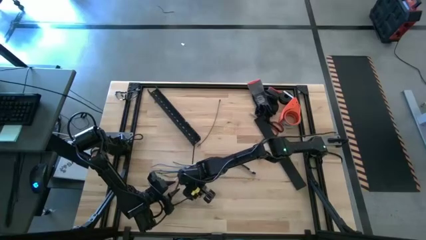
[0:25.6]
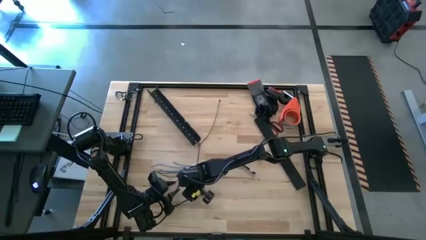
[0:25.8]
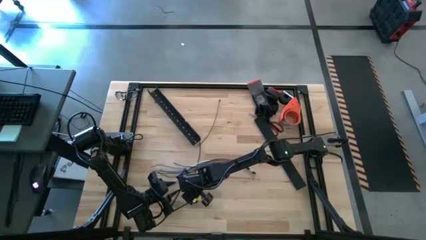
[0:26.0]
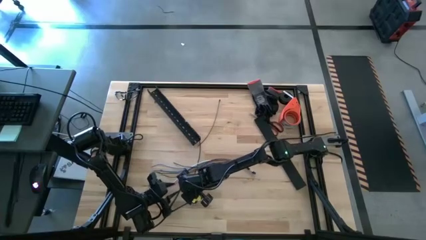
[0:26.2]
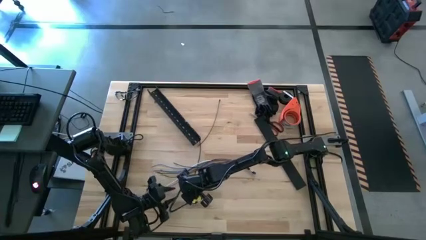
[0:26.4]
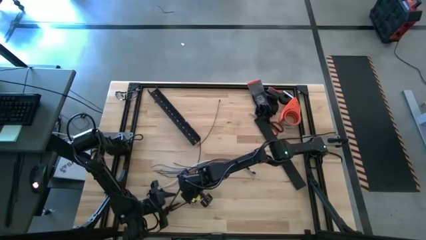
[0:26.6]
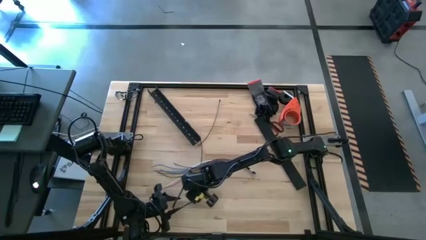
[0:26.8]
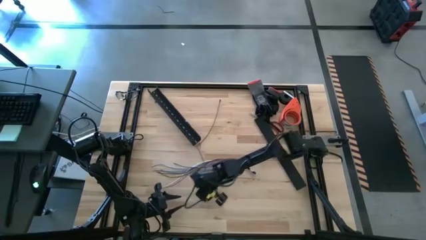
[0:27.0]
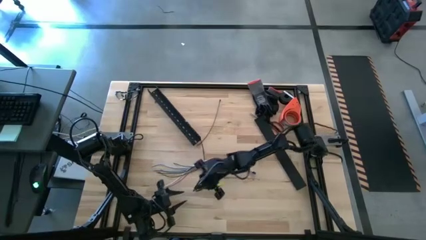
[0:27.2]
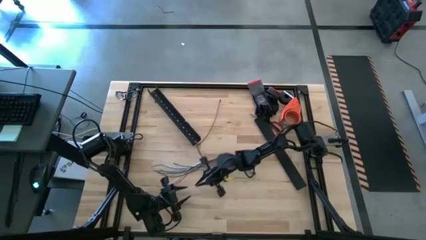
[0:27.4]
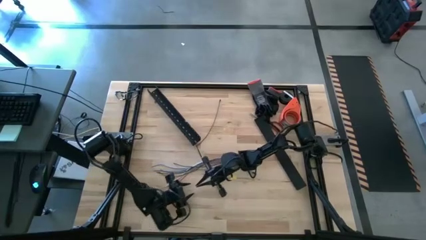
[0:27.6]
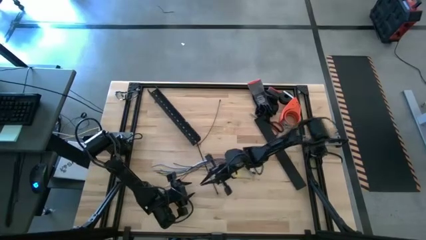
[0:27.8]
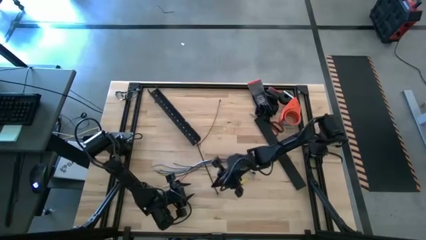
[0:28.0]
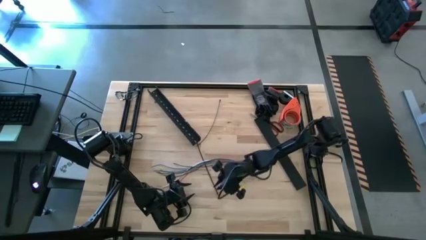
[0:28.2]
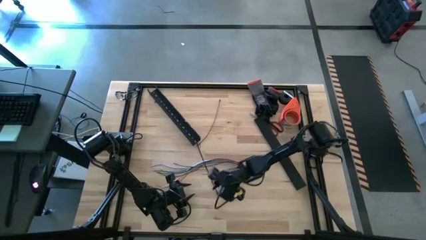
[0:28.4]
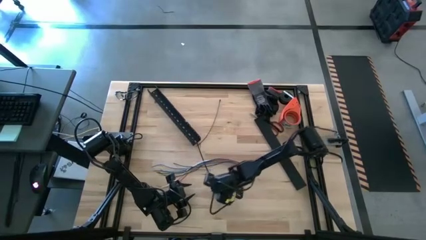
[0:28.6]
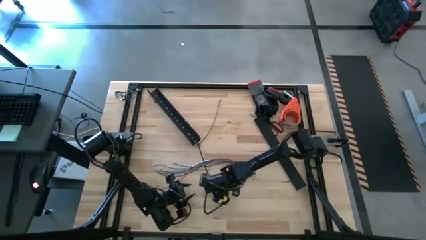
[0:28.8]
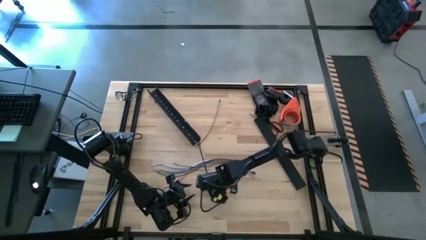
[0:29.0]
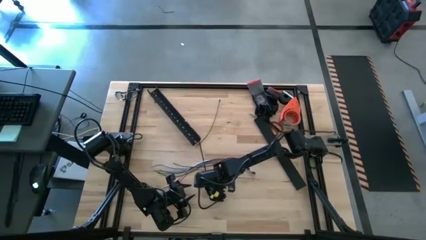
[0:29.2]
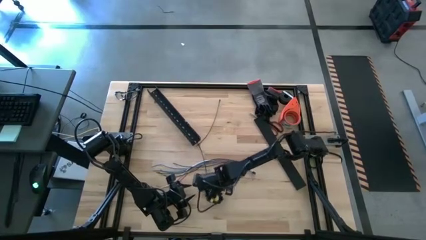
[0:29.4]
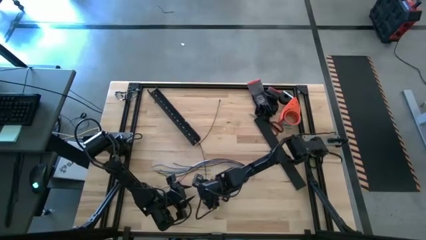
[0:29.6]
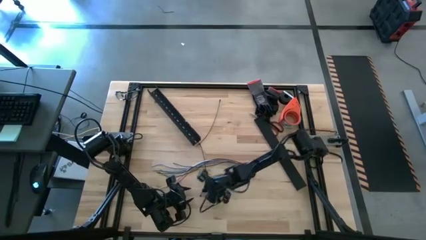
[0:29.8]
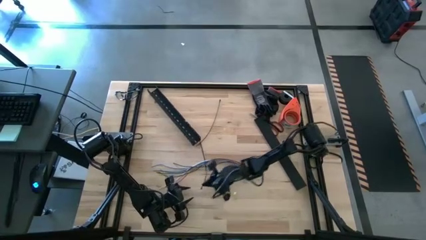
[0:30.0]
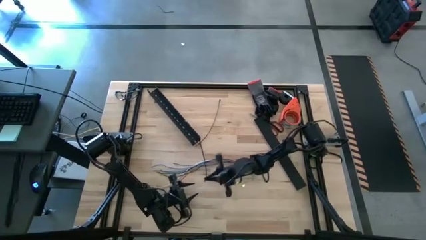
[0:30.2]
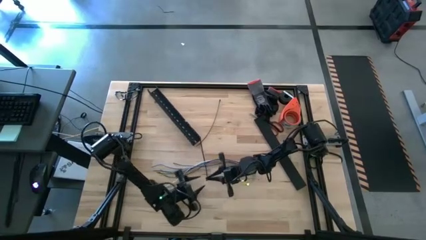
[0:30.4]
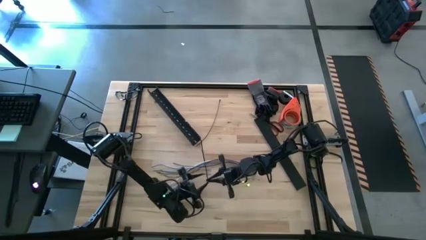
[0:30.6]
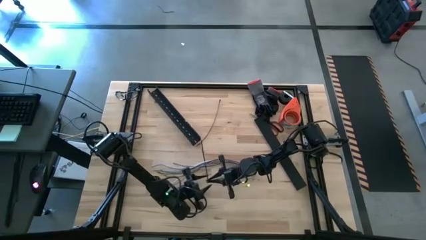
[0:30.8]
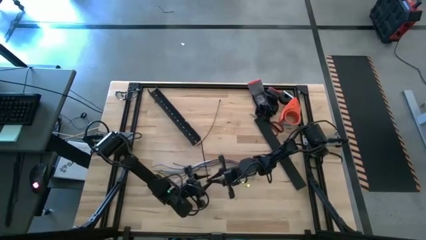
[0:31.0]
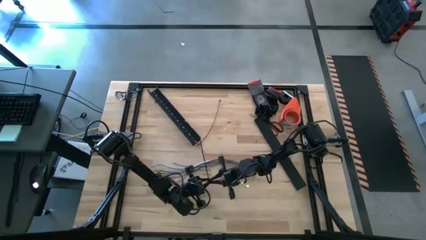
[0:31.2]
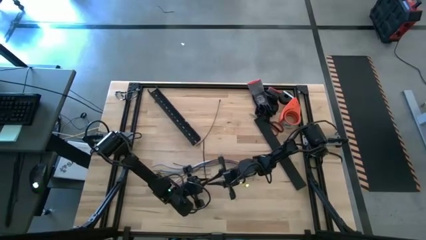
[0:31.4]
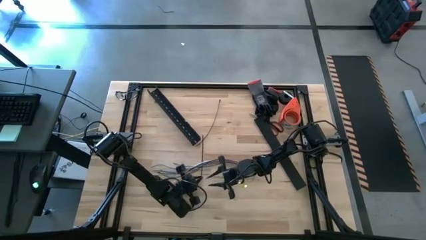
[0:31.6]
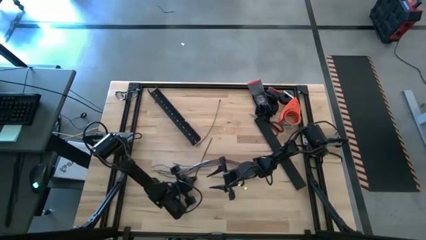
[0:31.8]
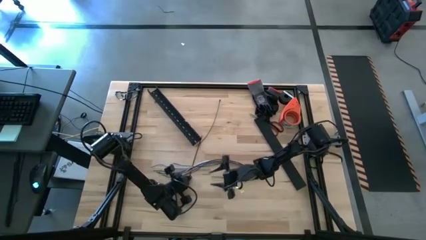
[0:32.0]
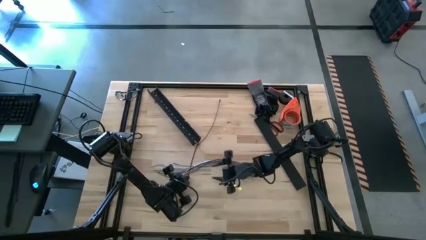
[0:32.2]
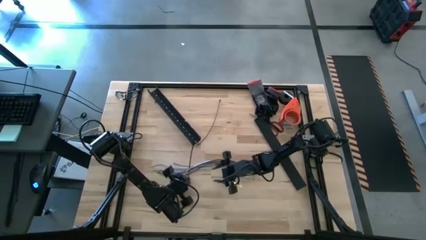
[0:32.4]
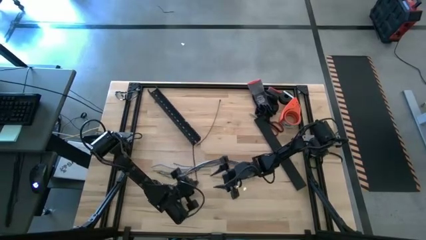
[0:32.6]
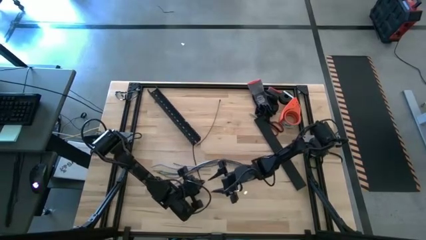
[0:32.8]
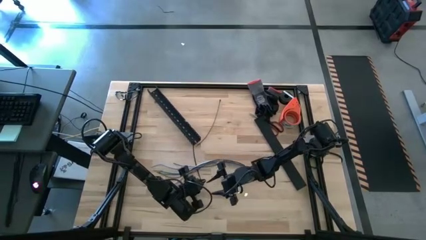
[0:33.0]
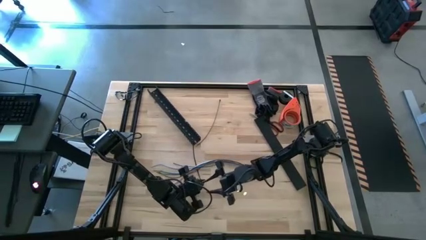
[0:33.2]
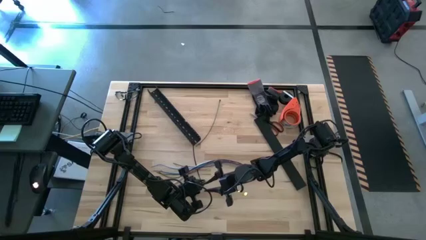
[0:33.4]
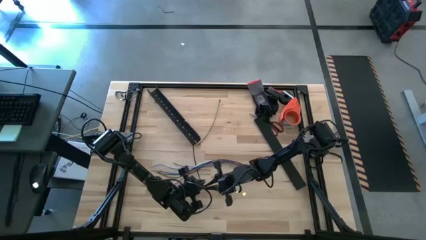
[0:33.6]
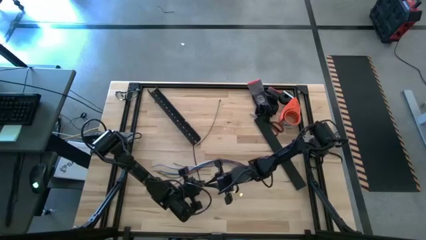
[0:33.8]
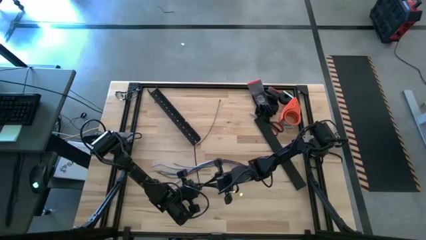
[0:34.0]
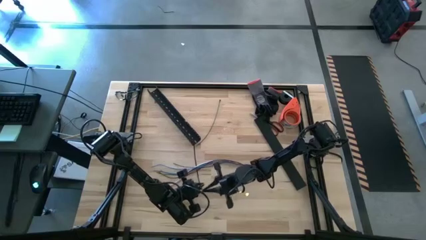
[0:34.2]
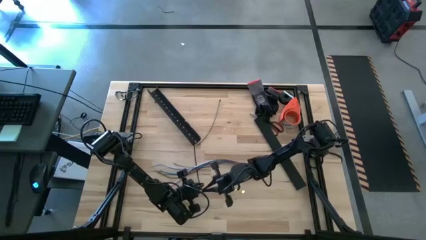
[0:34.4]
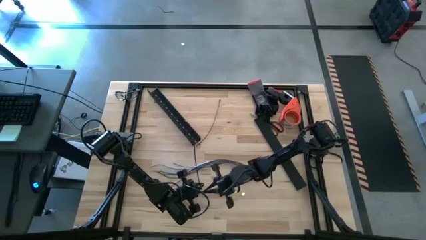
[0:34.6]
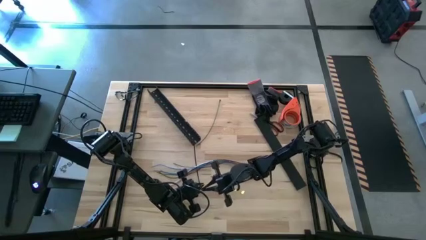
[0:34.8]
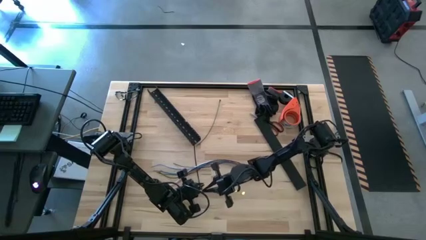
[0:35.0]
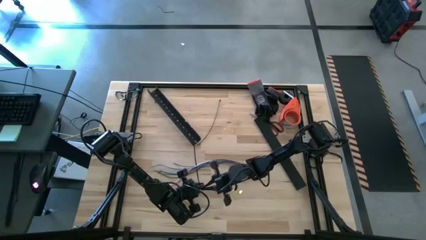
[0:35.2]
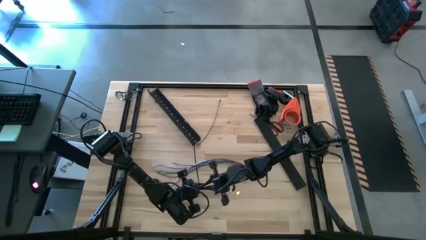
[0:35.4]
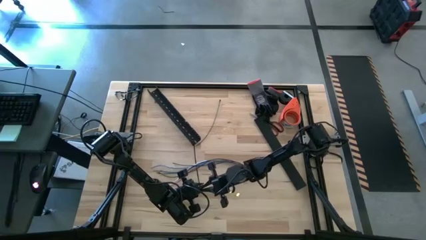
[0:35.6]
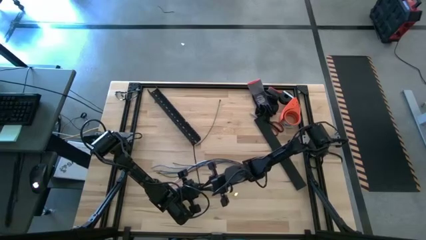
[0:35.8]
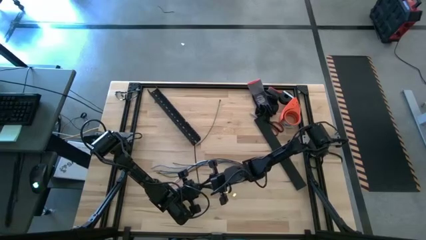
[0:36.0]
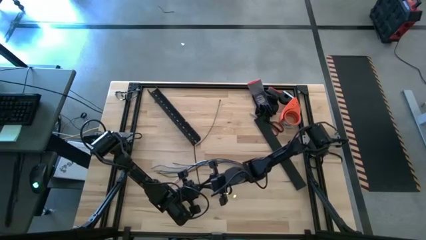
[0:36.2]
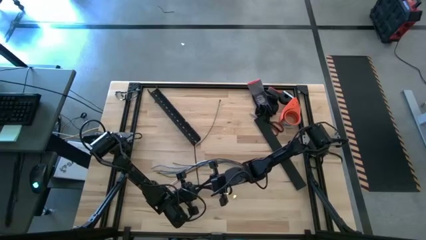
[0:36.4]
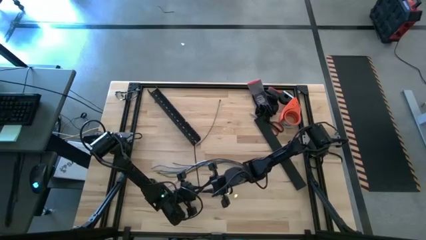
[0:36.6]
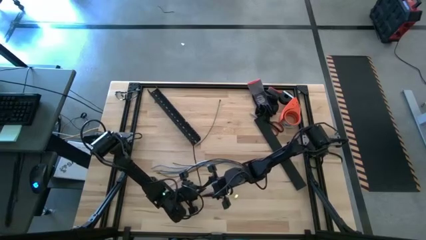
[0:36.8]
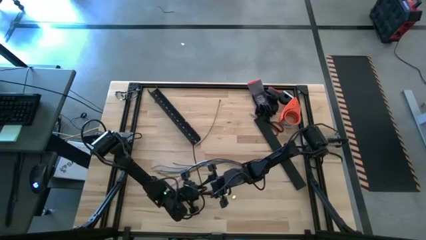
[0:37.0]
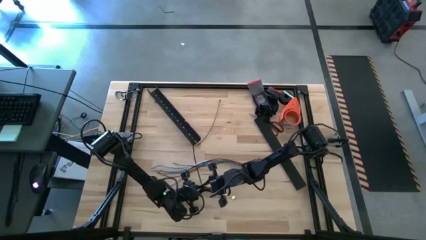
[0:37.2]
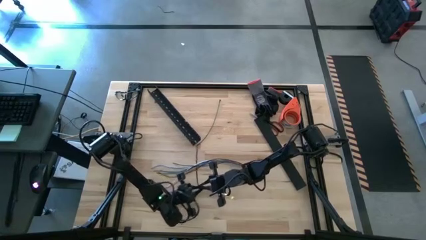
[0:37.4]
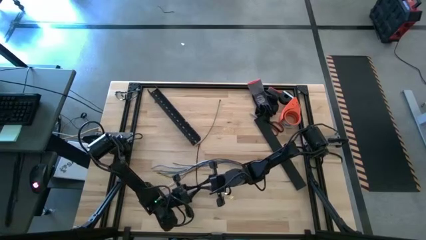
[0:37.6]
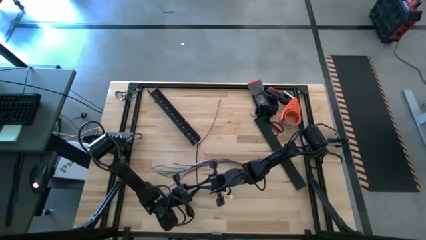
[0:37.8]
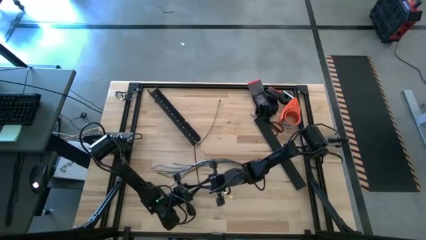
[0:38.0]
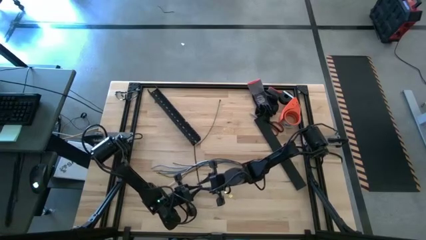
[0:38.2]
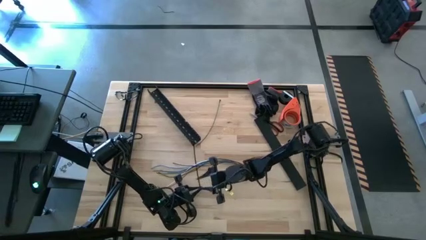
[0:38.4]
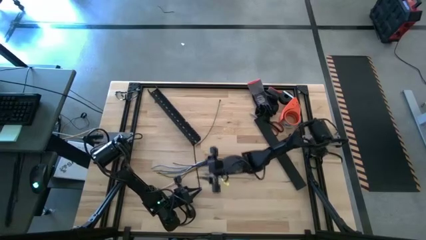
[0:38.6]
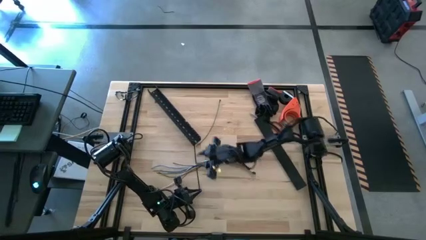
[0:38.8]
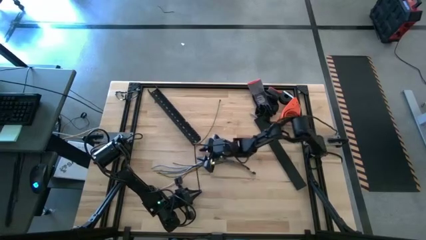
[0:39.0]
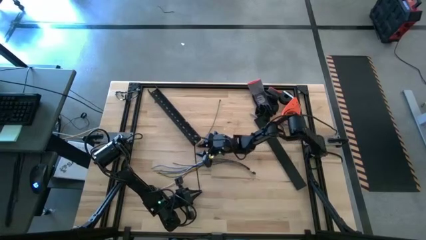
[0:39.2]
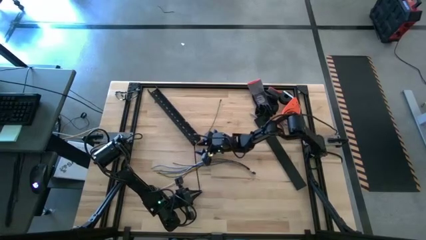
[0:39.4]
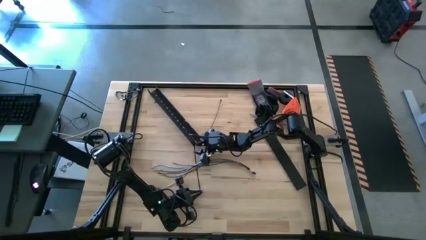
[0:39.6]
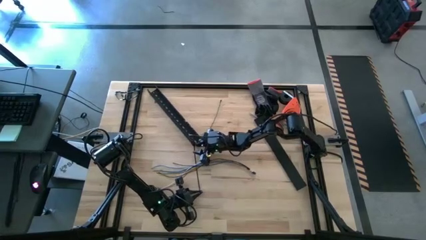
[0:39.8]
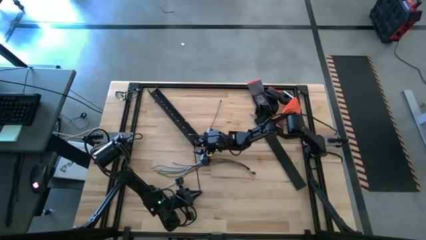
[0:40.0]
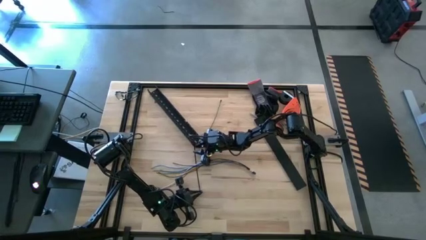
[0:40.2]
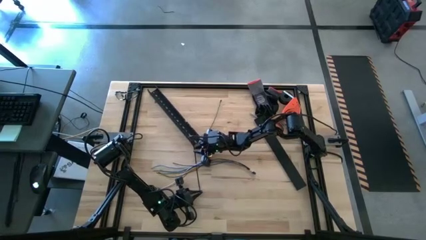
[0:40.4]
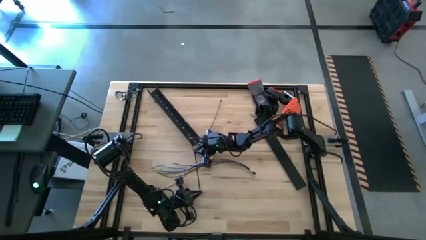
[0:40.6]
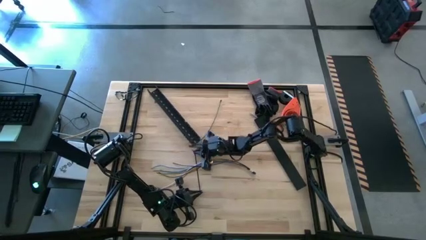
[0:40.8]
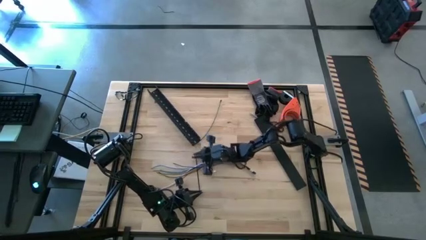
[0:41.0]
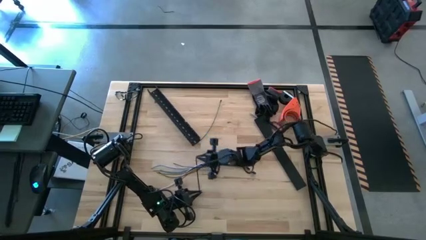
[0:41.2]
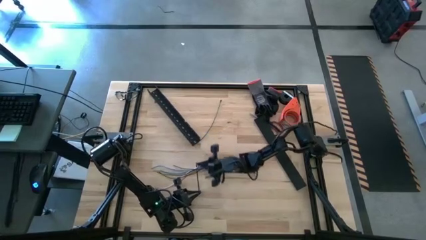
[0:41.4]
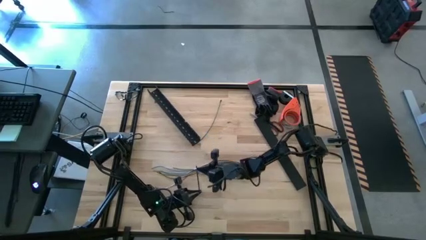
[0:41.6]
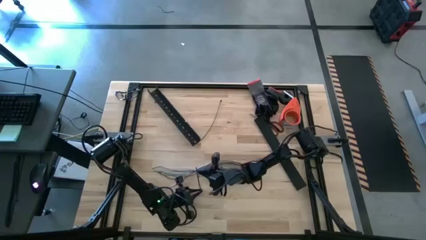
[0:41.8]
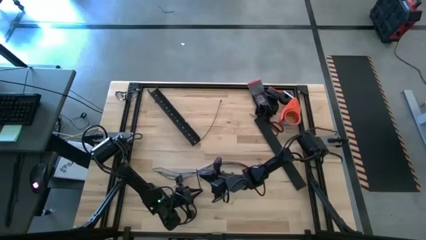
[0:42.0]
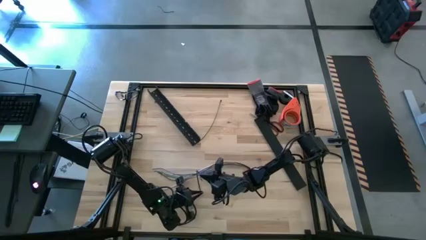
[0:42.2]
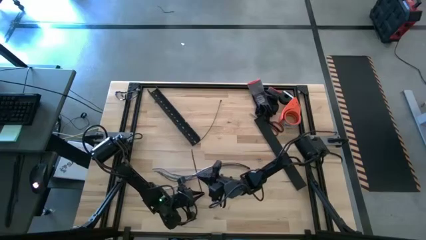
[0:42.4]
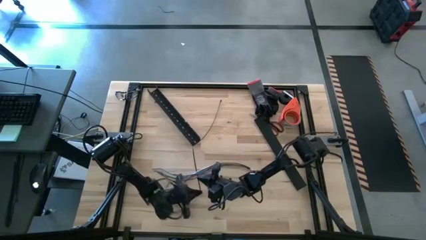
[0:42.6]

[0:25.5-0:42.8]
Task: Ziptie cables
Wrap the cable wires with the black zip tie
